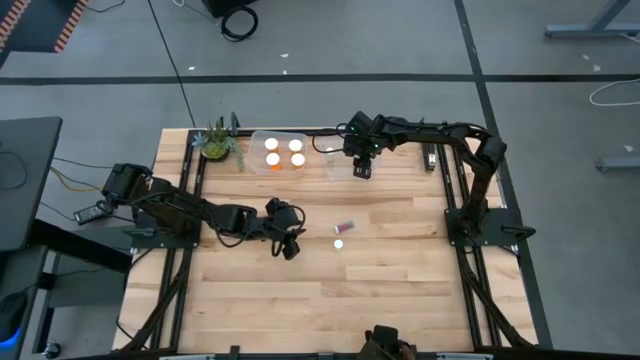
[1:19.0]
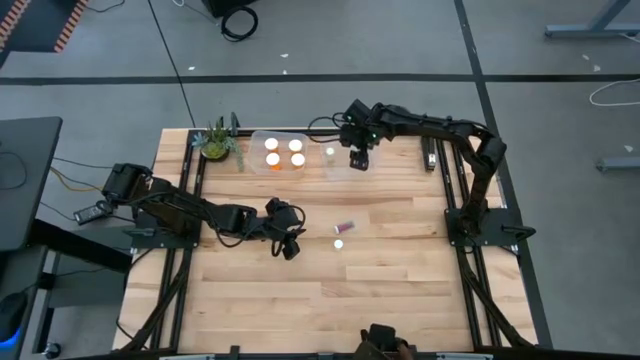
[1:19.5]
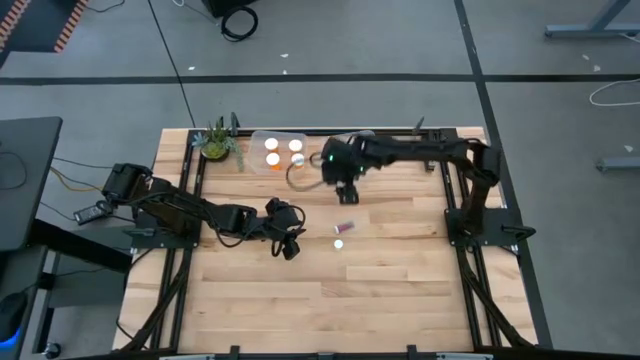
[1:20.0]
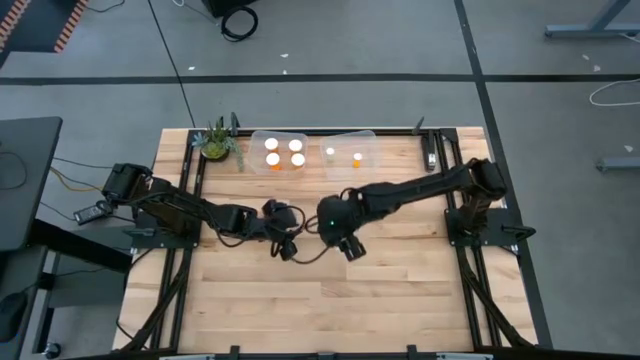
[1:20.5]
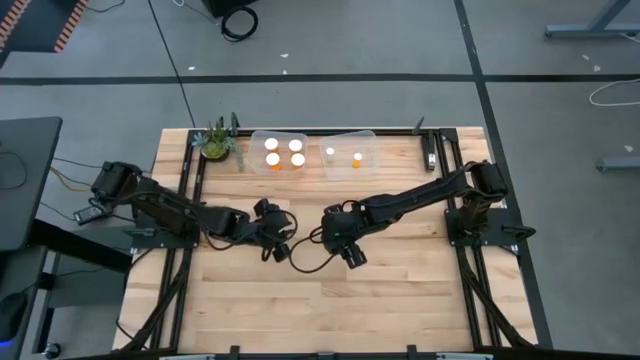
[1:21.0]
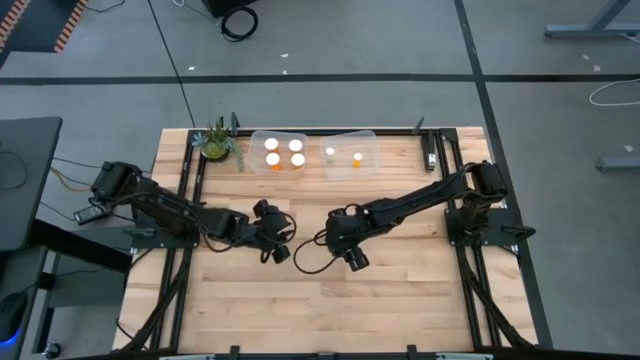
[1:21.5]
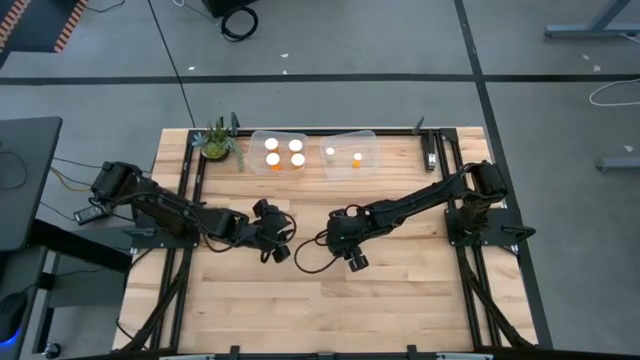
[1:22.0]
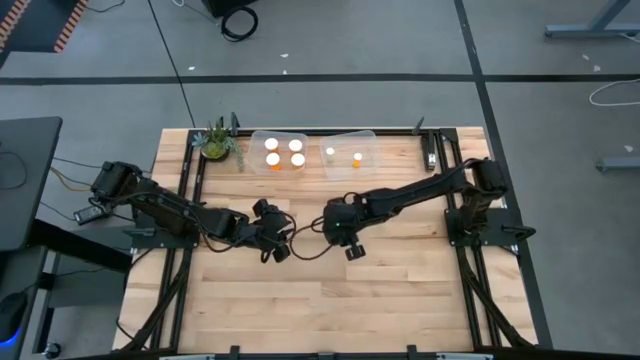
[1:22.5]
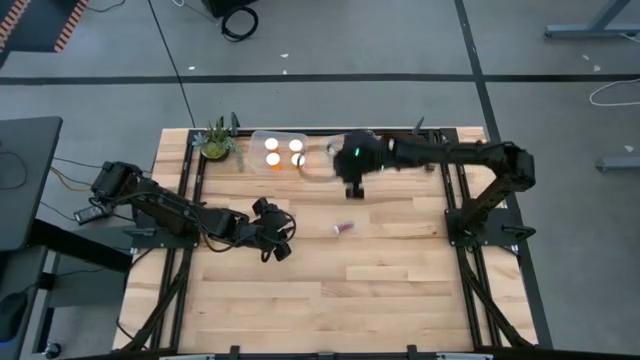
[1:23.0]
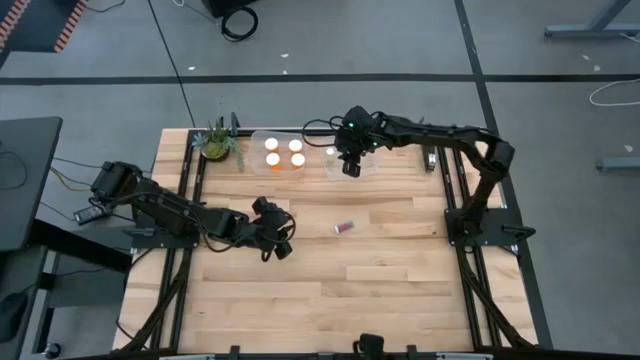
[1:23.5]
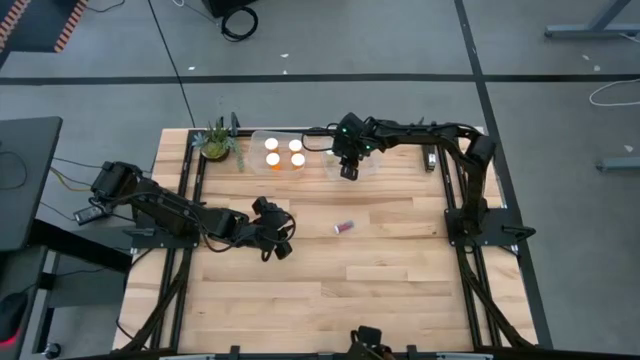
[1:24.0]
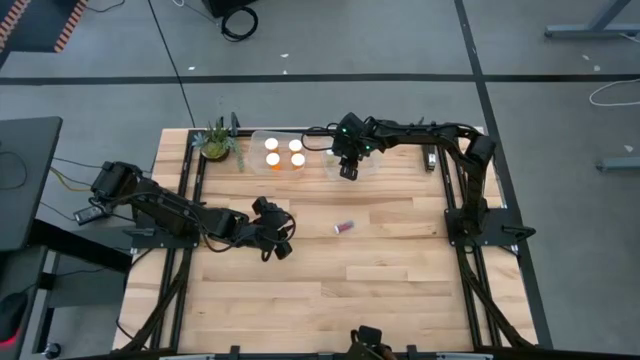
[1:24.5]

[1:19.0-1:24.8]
Task: Pick and place medicine bottles into bin by pill shape (circle, oval)
Put the small yellow pill bottle into the right bin

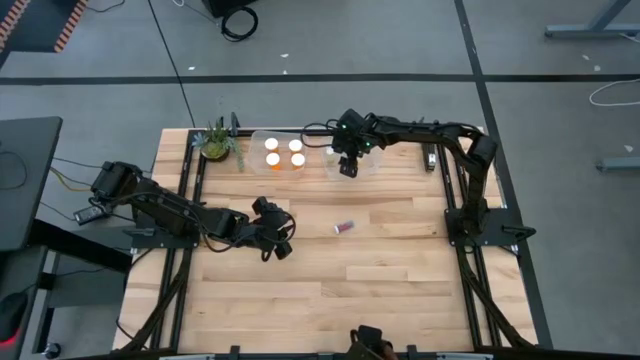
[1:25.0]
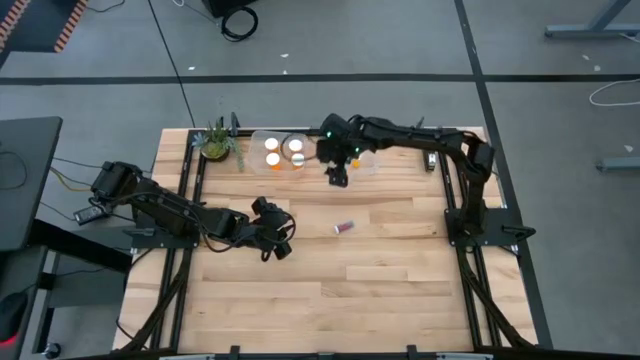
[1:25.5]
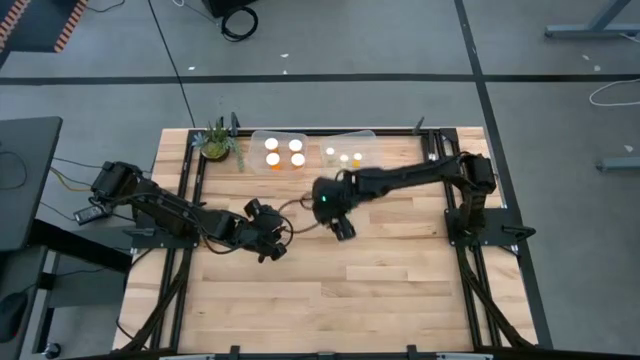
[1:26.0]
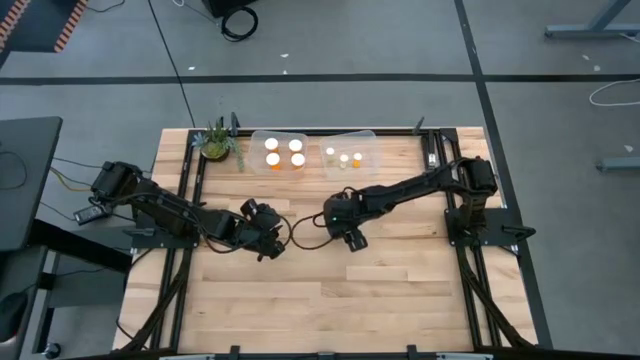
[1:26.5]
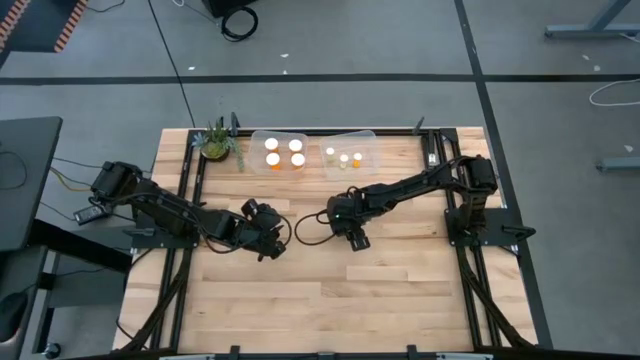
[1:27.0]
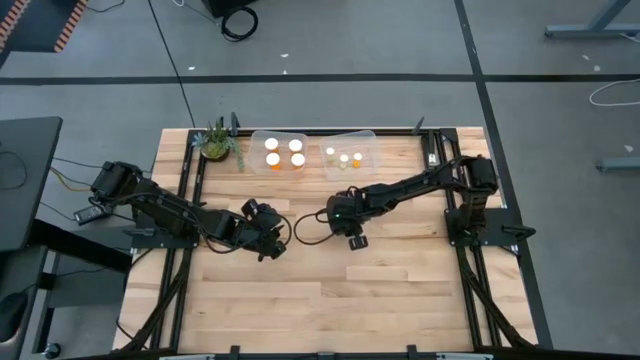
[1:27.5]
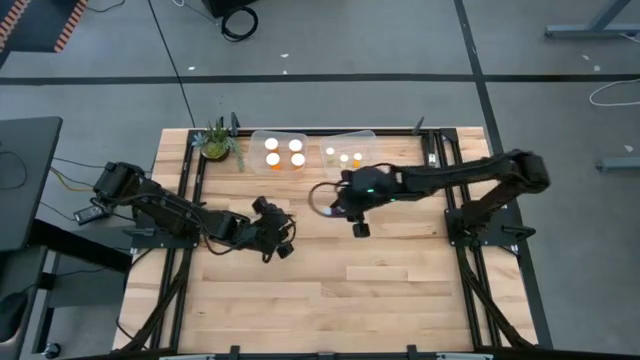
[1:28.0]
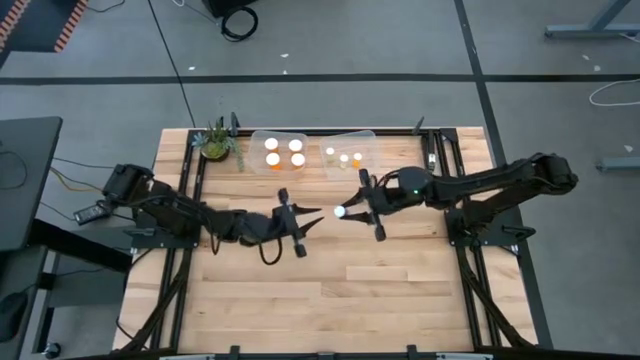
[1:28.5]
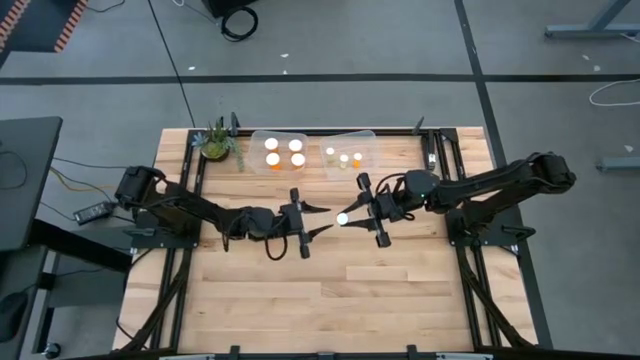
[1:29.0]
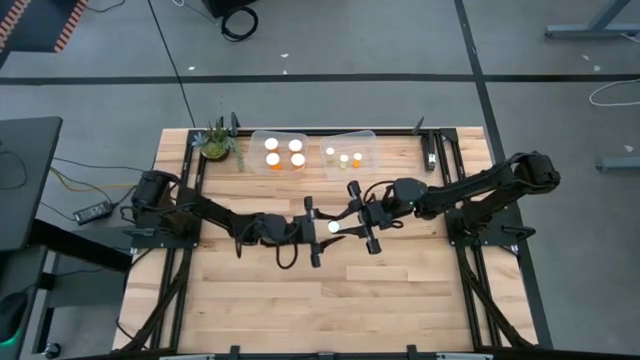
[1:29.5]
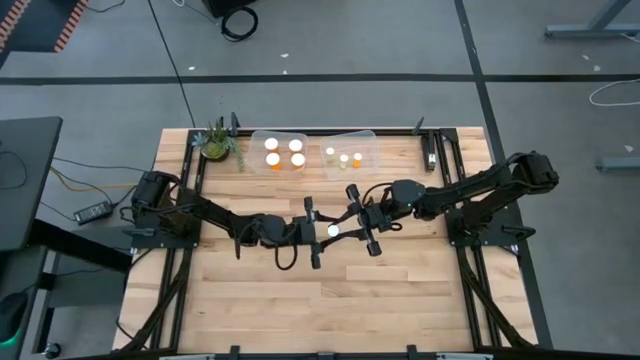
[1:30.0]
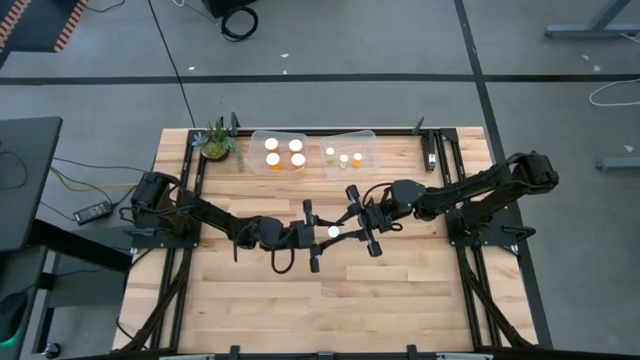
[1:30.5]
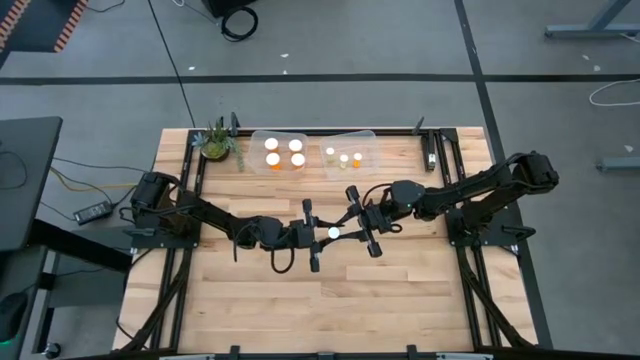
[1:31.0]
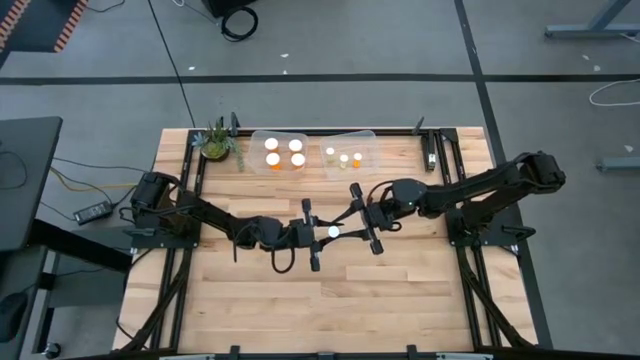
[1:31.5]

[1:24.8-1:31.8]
Put the small blue pill bottle into the right bin

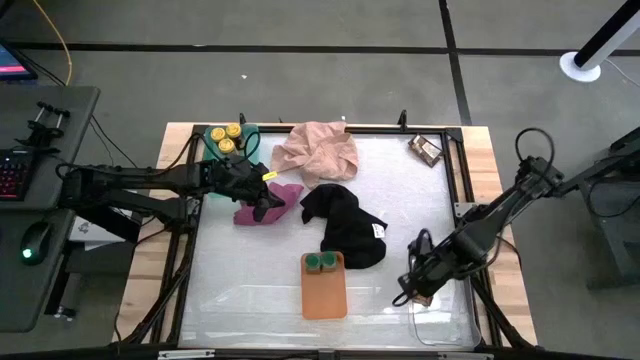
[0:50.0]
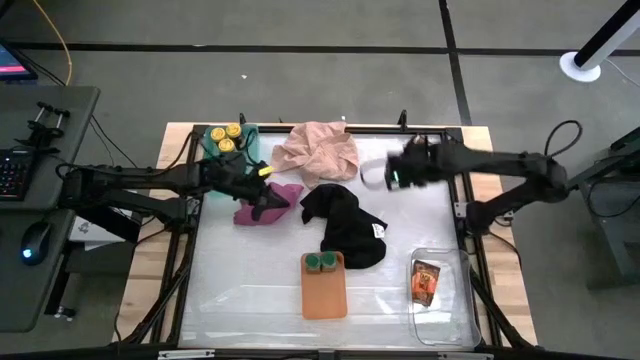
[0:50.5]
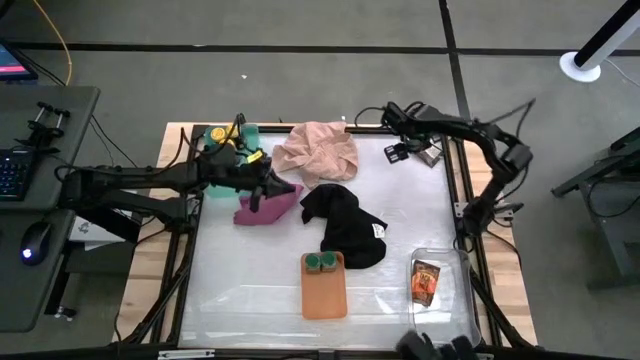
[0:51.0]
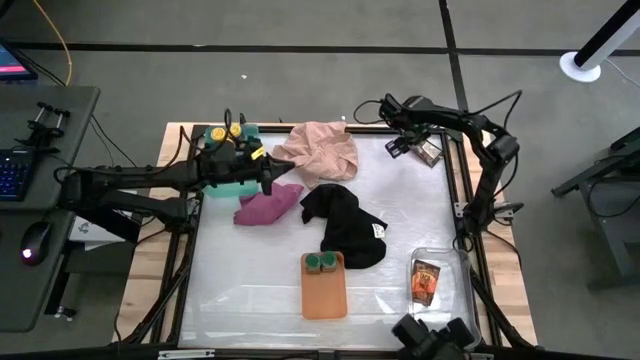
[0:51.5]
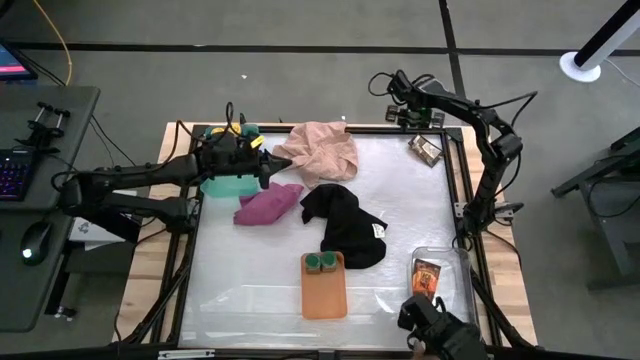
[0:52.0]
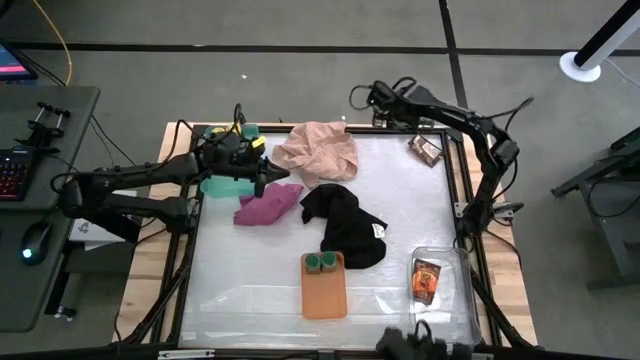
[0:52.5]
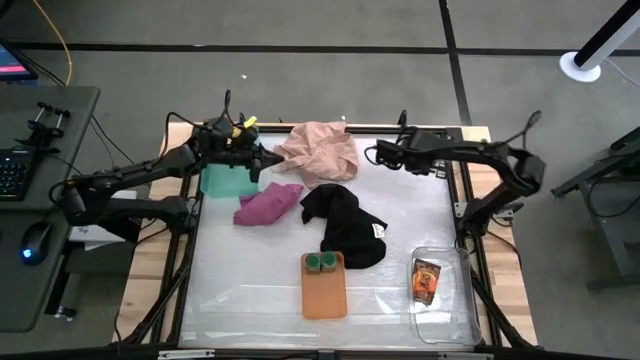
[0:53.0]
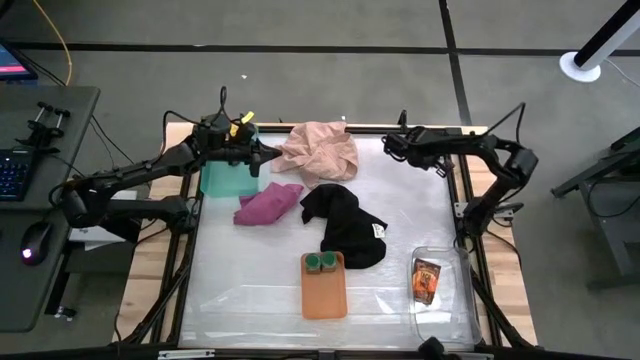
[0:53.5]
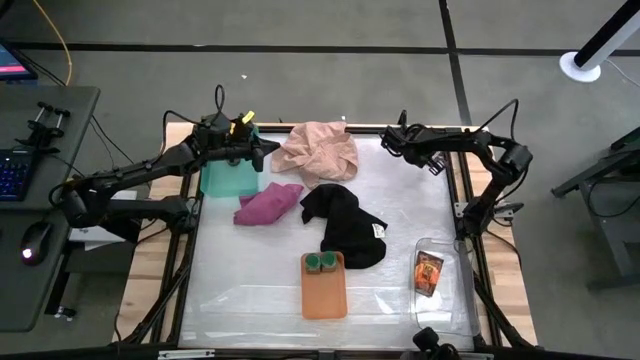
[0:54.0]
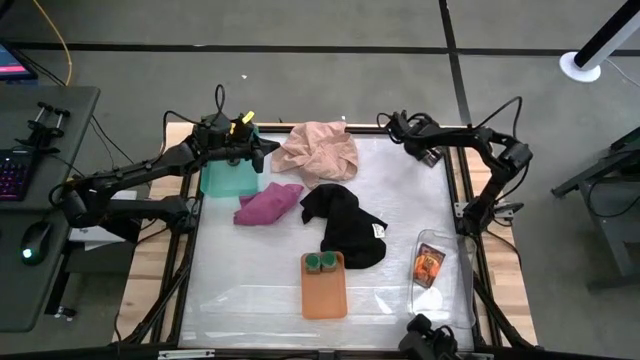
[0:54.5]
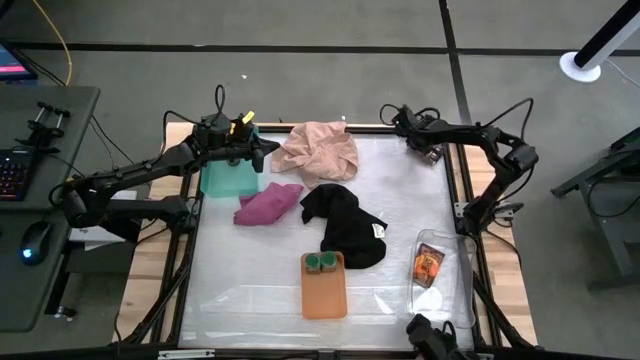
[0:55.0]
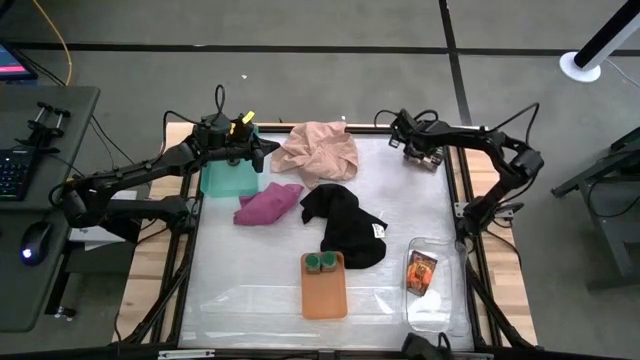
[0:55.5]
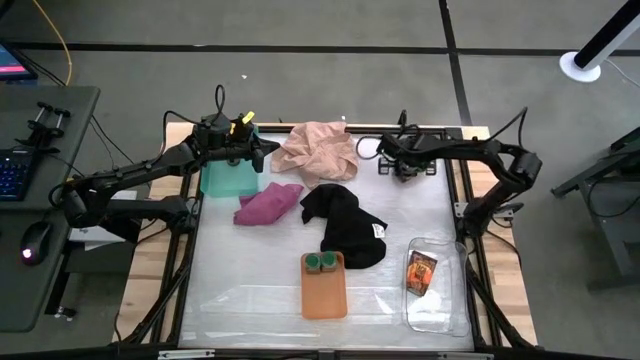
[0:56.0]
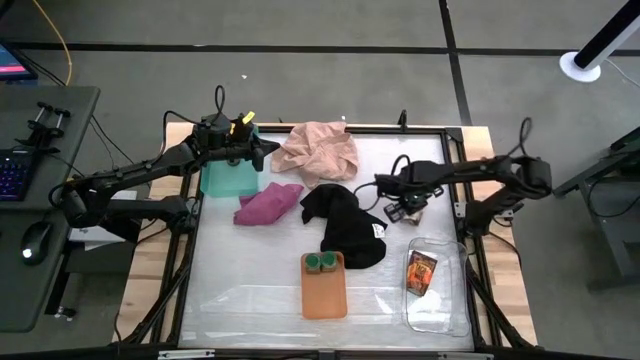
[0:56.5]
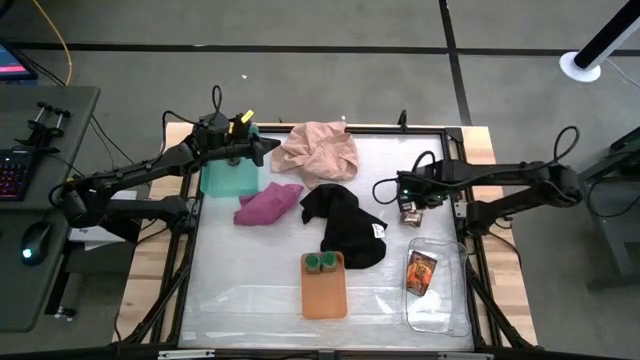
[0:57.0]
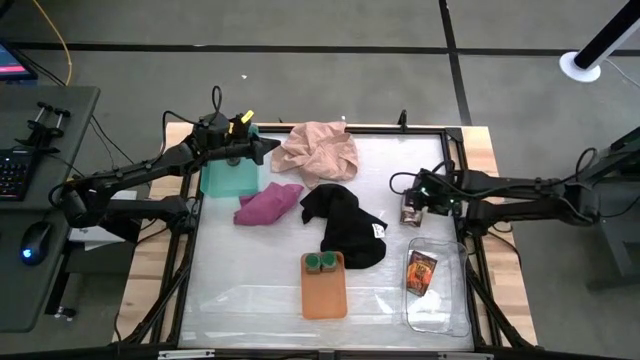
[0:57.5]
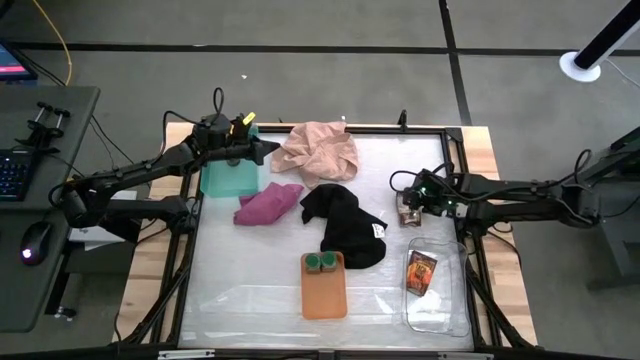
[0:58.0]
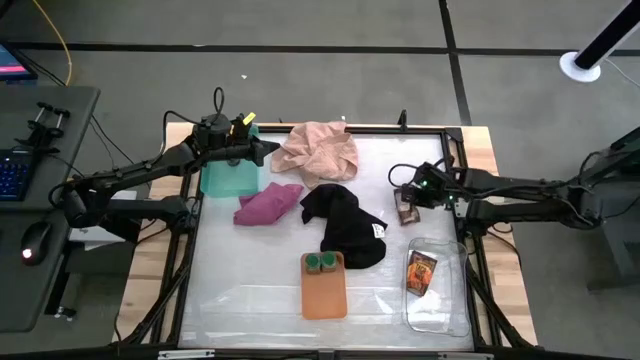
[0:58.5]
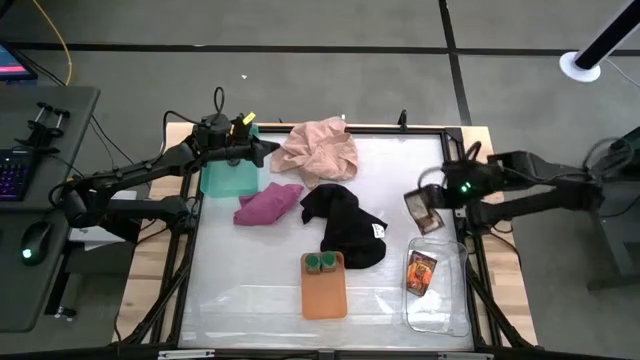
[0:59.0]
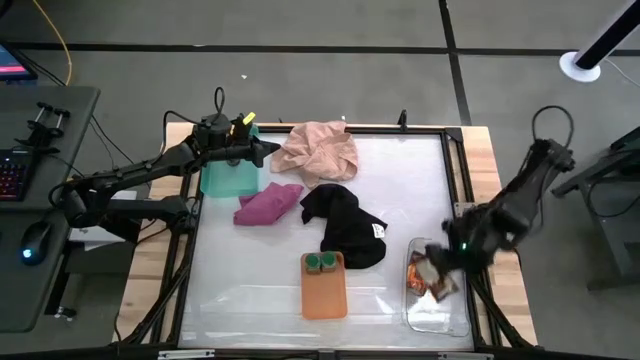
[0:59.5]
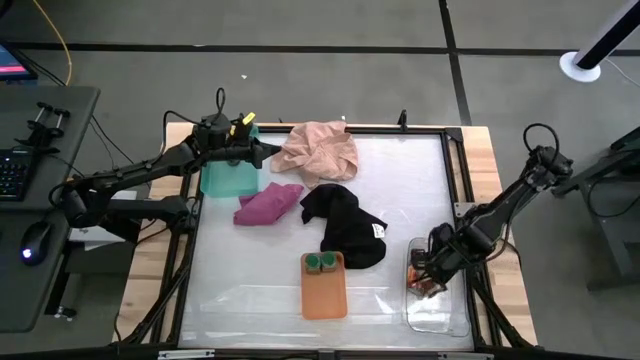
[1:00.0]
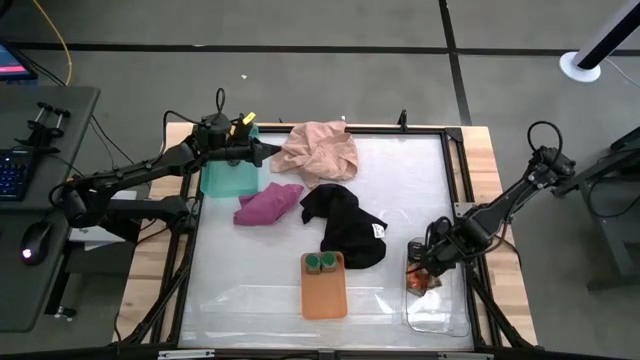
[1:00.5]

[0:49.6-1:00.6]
Task: Sort spices by type
Put the brown seasoning bag into the transparent bin
